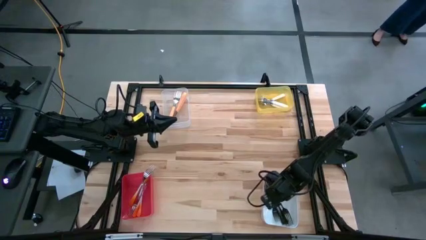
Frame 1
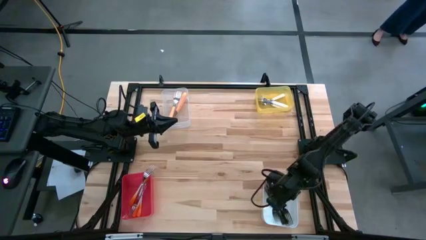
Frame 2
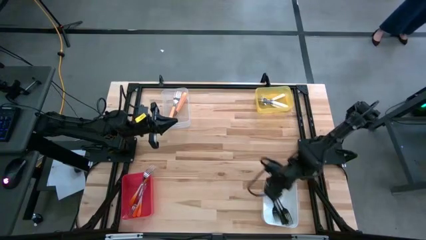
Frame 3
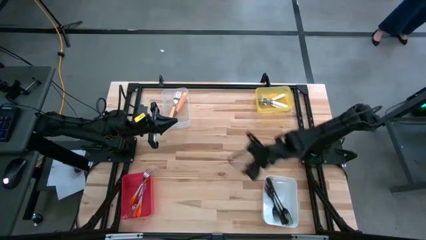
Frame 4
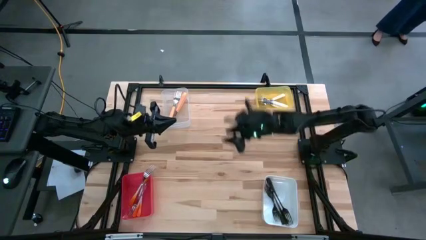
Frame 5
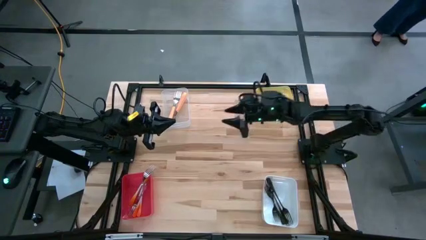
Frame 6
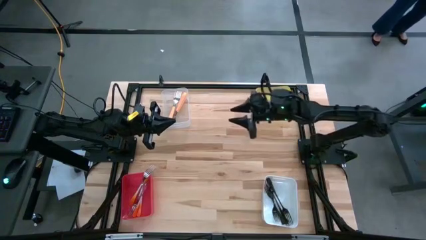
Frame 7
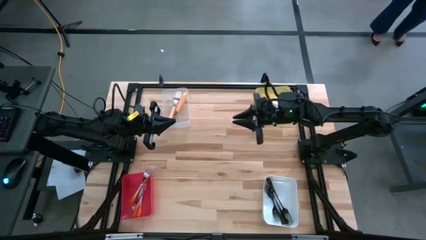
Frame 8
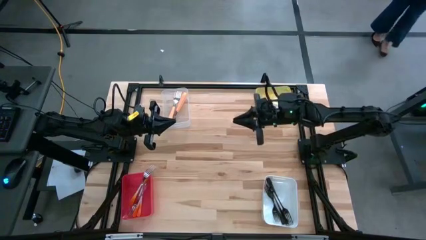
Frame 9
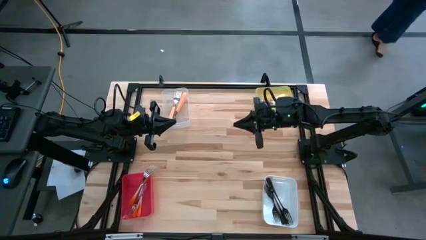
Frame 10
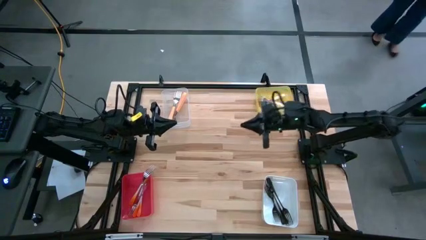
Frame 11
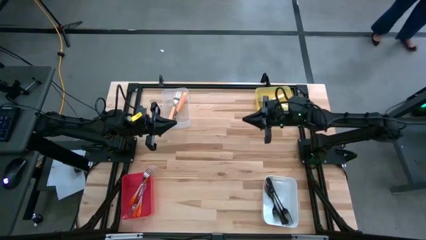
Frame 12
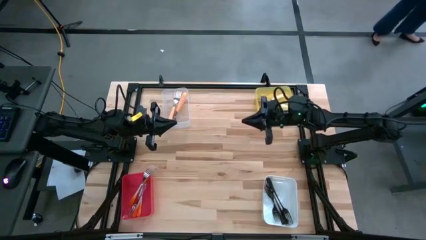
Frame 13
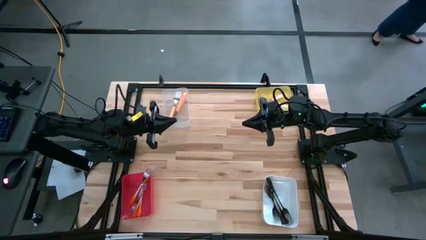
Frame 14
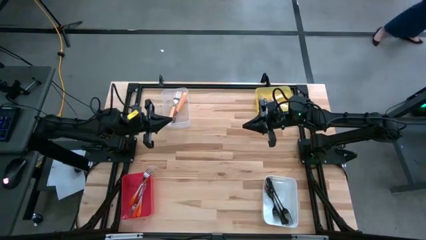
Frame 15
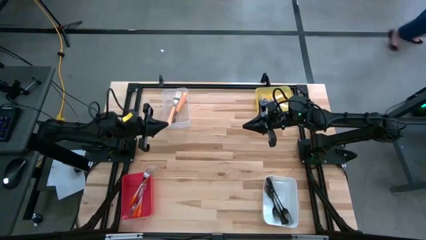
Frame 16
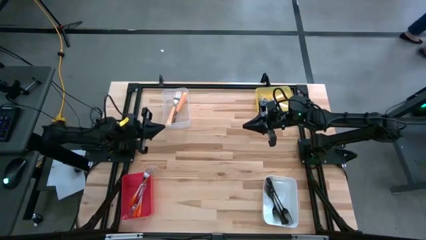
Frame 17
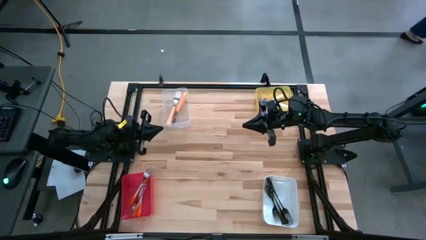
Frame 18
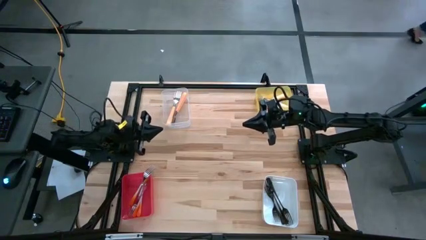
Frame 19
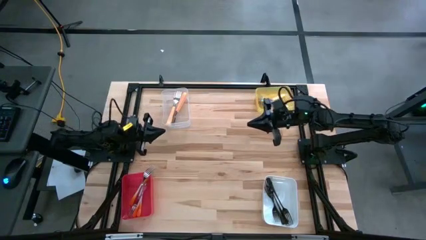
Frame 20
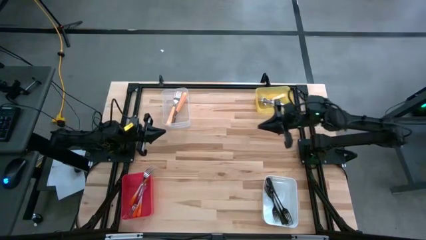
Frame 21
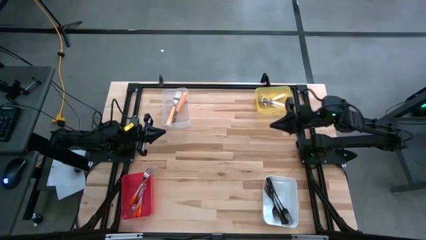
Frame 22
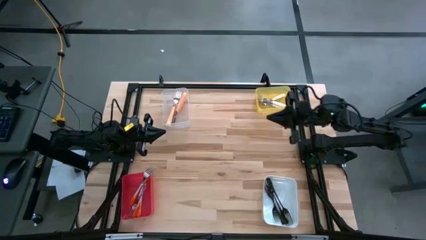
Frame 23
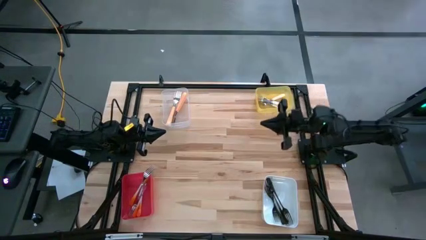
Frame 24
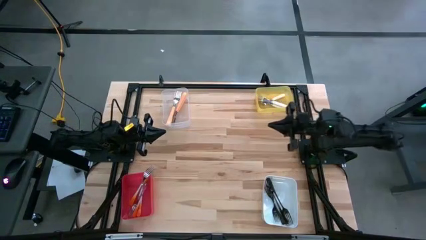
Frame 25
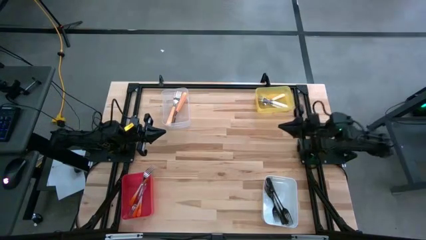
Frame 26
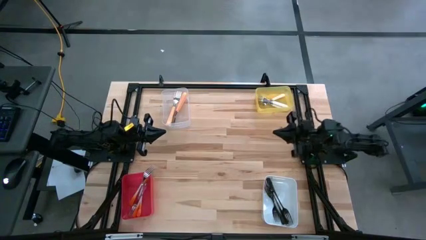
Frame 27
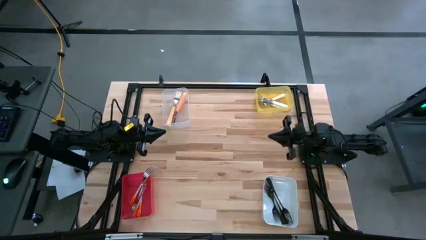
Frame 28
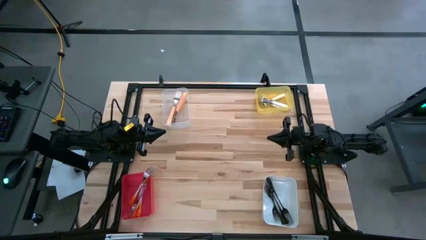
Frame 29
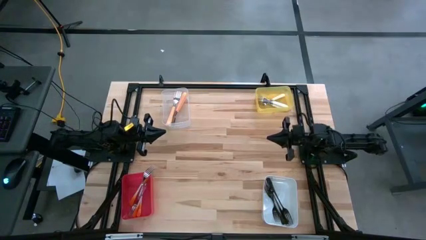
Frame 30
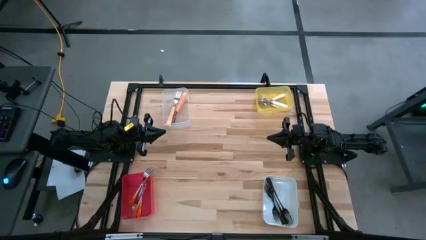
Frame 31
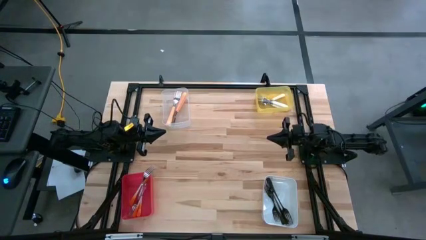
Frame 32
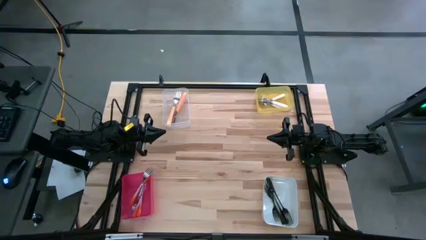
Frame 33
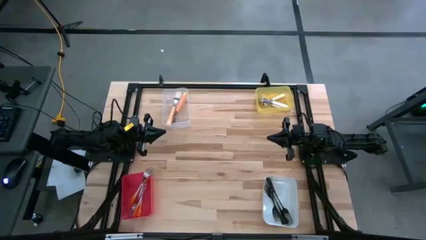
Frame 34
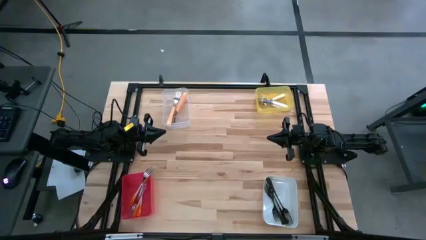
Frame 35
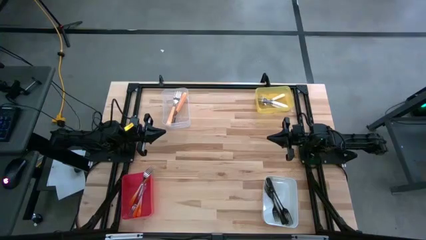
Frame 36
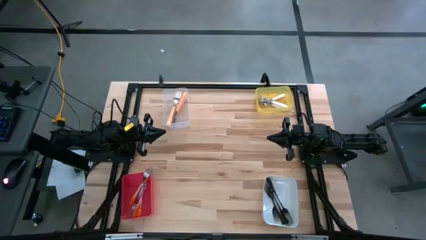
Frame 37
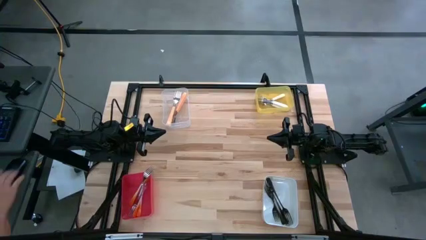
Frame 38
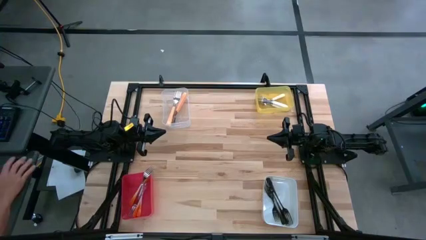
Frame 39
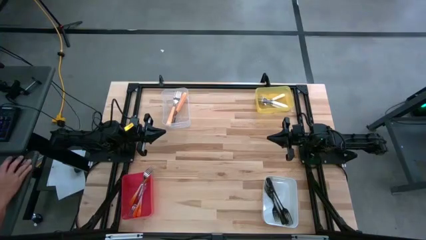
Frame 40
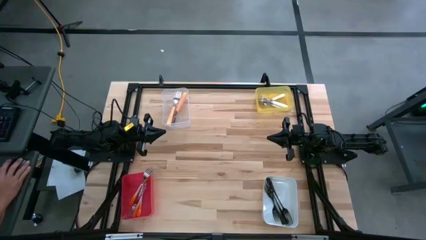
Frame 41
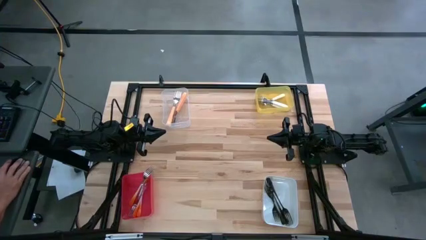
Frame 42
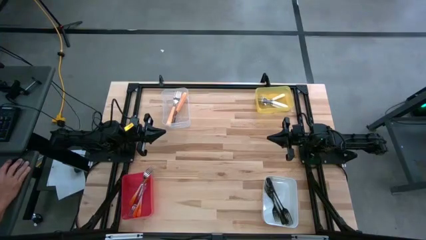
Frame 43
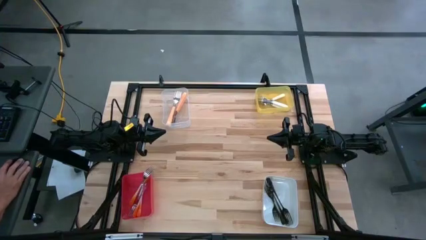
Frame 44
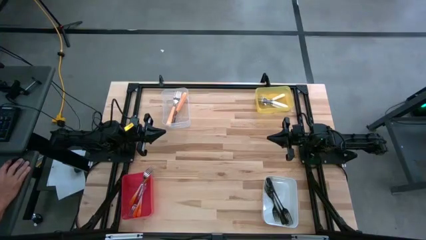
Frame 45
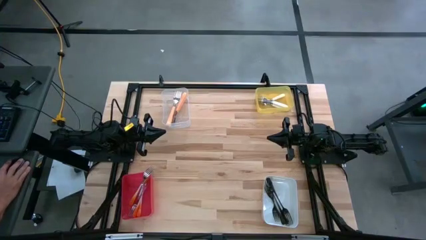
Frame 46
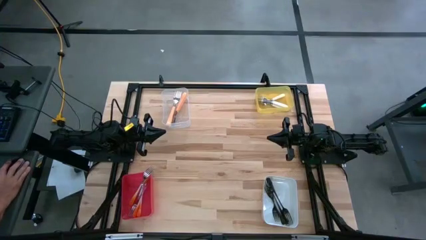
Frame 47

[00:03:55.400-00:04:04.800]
Task: Sort silverware by color (type)
Return to Home Position

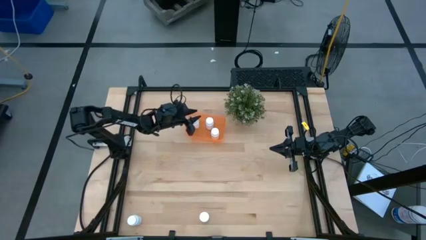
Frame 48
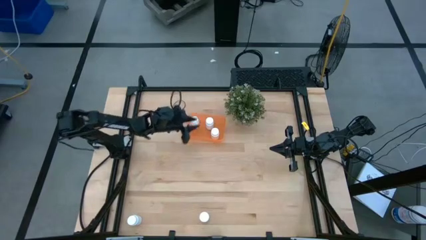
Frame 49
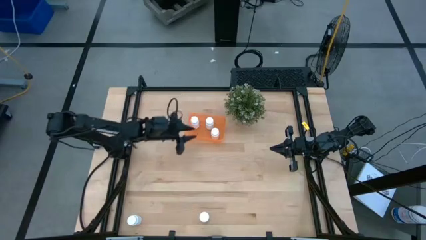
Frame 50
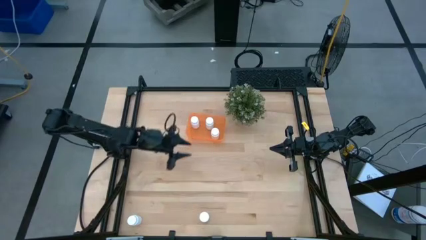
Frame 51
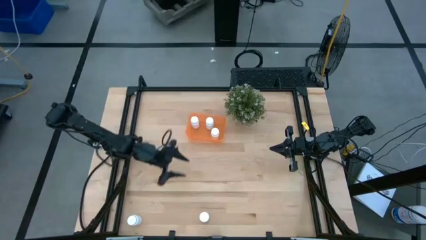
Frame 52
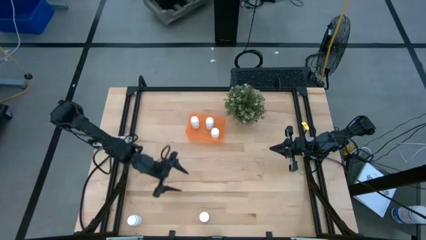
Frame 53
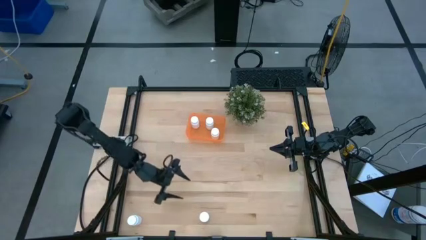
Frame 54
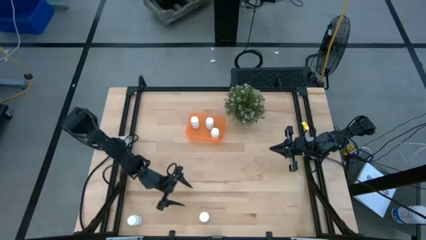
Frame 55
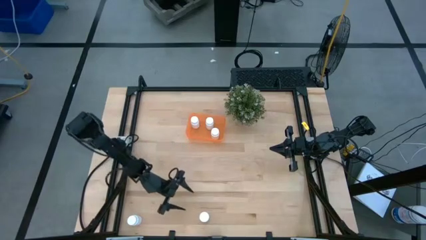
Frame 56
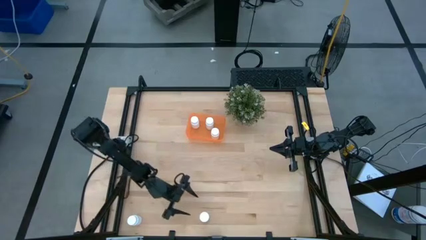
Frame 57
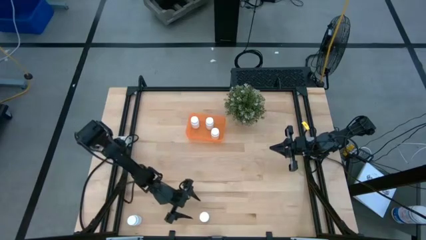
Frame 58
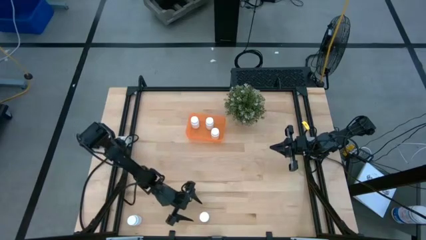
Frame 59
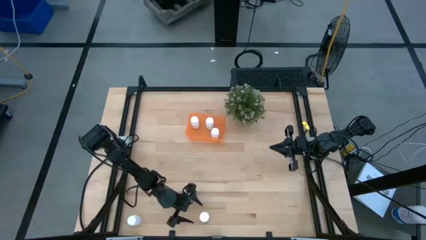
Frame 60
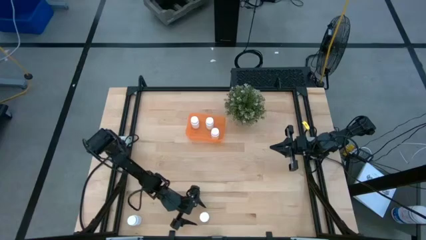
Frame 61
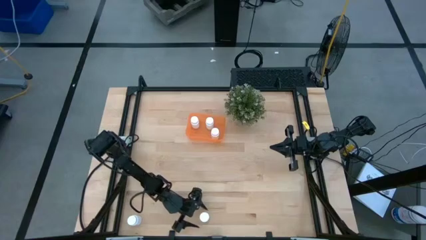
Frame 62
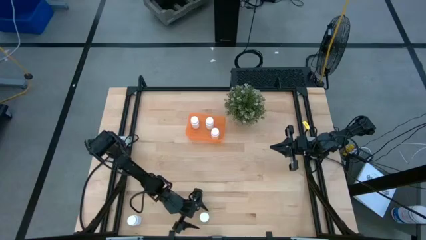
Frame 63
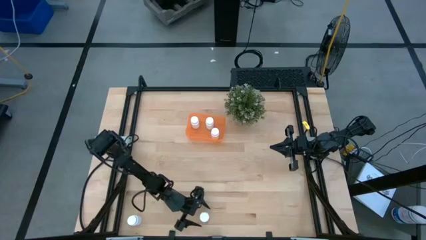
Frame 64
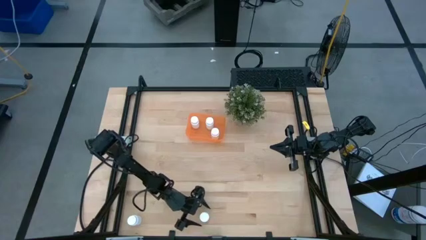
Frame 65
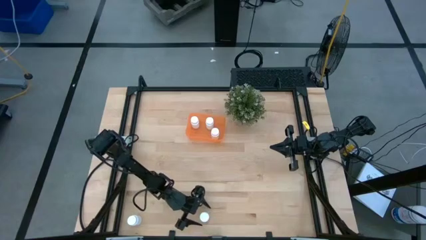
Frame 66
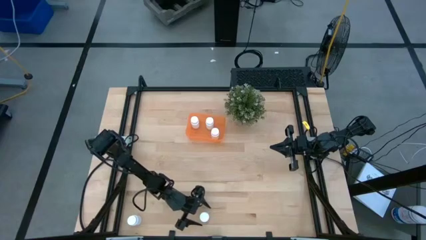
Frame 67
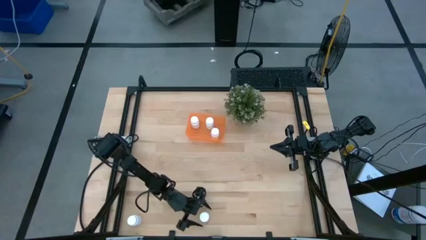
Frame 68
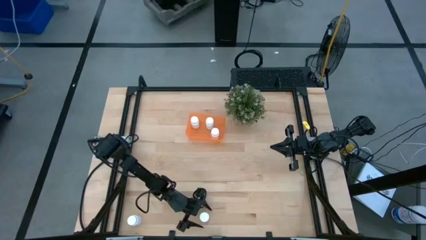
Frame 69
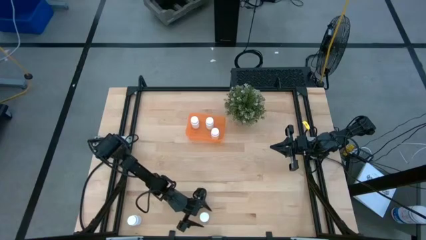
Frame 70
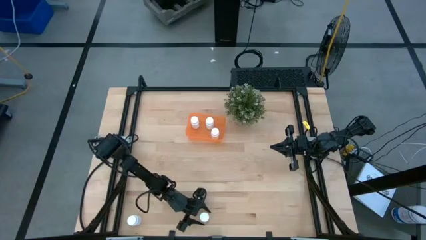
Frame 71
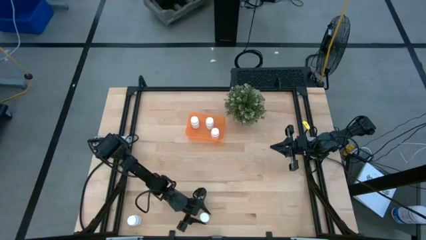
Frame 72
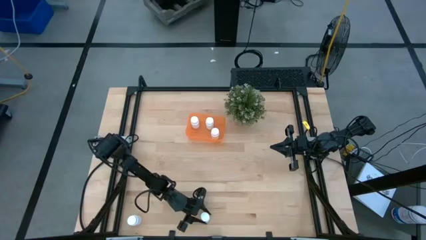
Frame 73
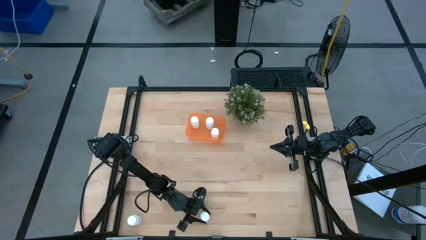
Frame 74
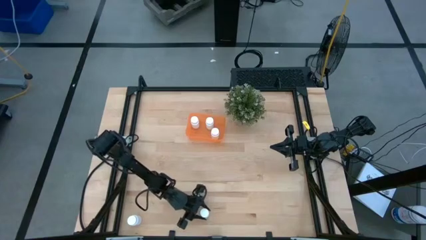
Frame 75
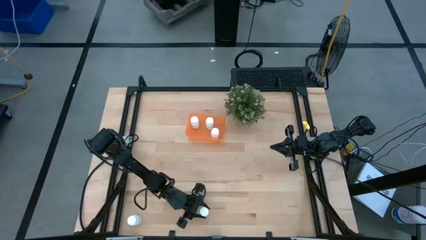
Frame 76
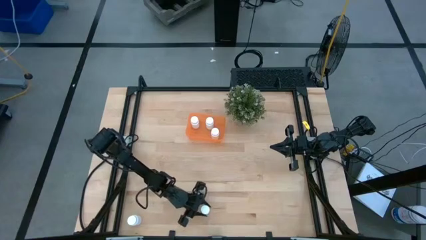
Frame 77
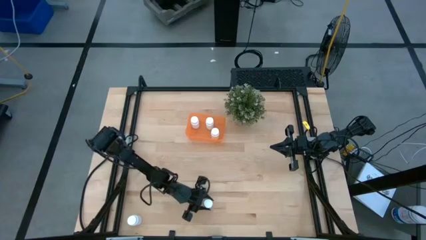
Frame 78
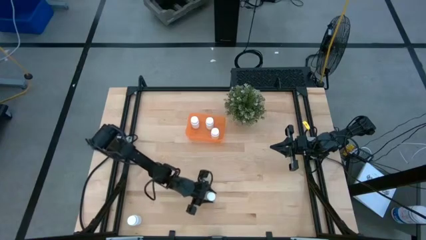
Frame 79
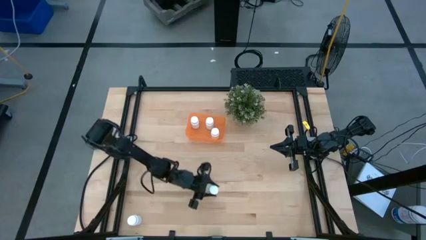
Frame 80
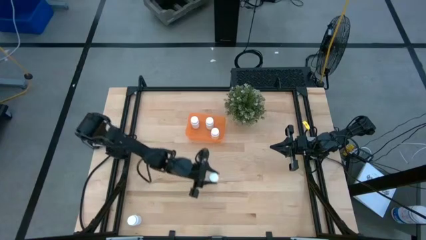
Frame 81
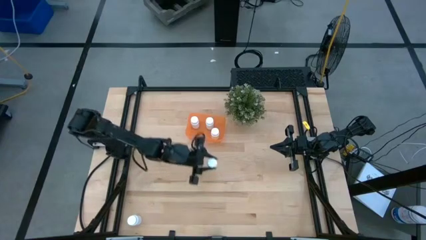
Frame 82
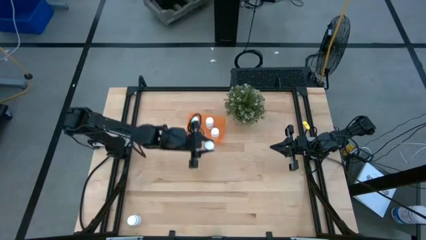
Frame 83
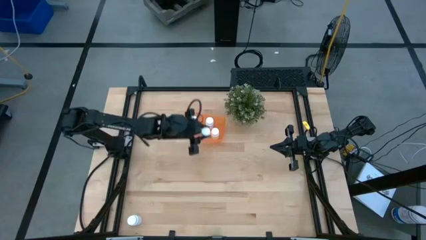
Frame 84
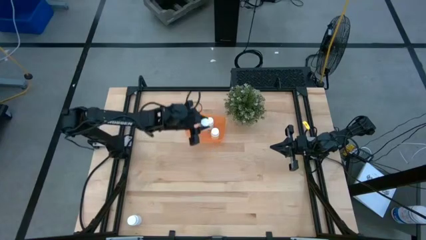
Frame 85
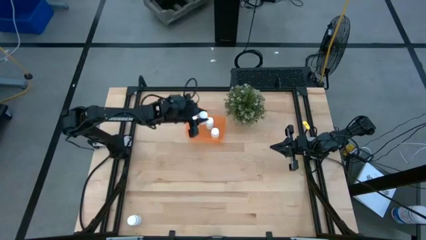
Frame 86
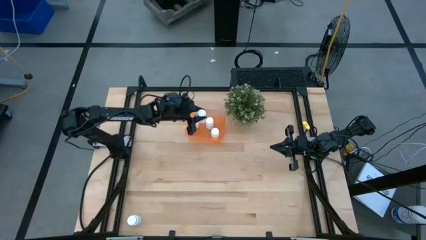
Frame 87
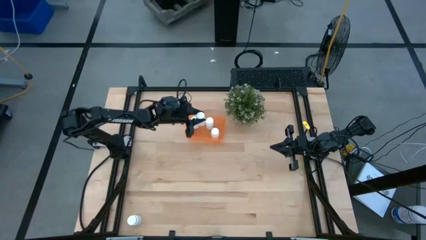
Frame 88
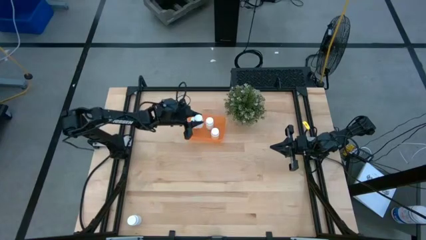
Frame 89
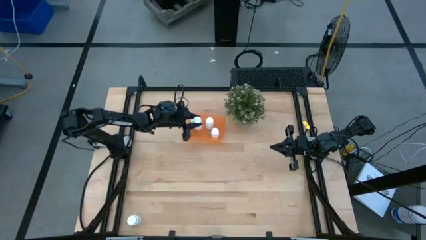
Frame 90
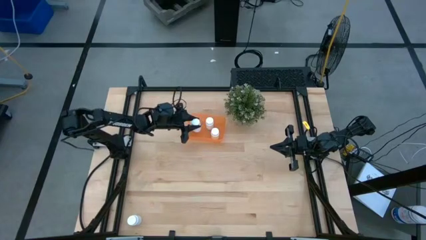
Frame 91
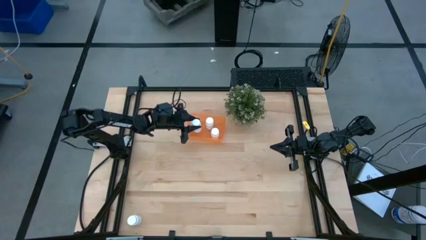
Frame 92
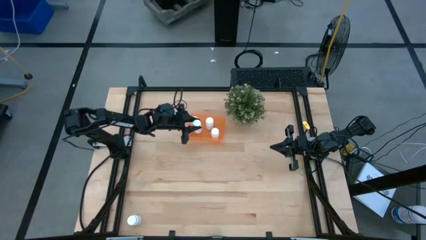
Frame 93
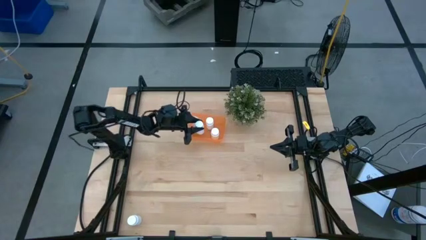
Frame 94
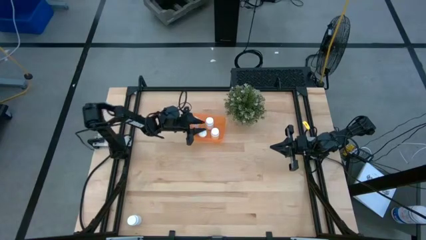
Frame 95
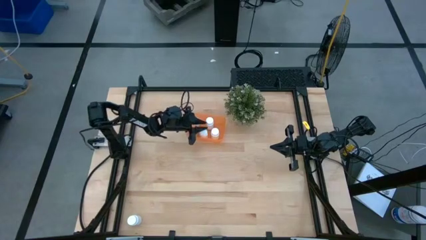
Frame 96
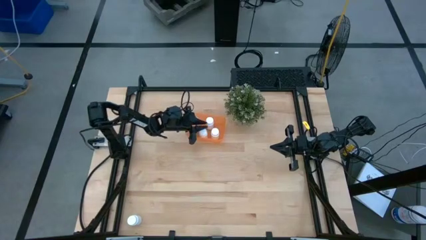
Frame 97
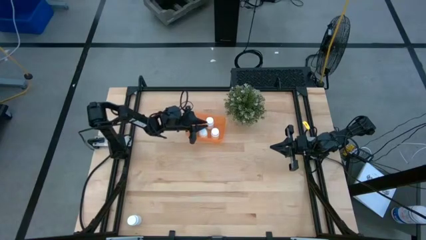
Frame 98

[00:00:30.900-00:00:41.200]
Task: Pick and place pill bottles into a basket
Put the white pill bottle into the orange bin
